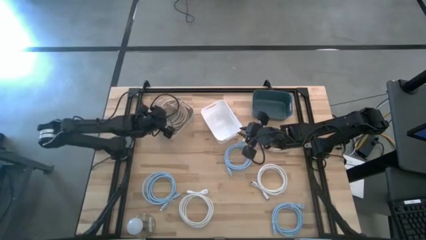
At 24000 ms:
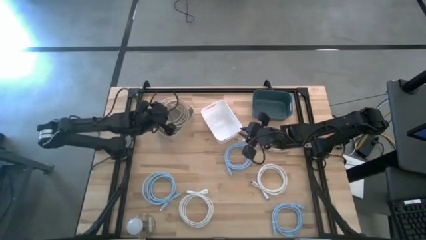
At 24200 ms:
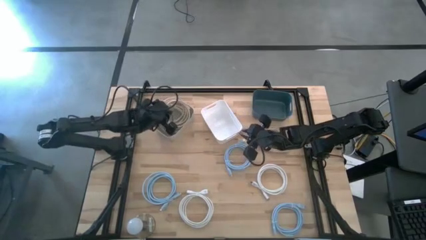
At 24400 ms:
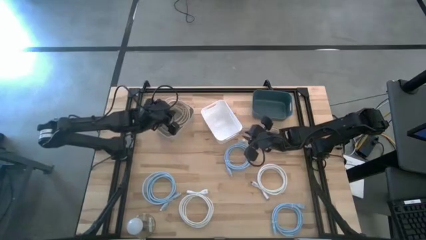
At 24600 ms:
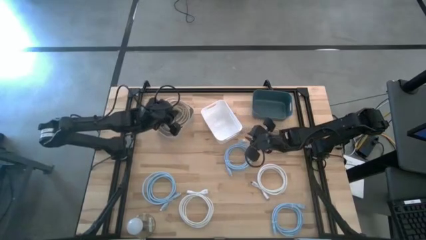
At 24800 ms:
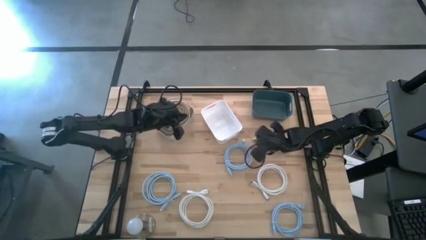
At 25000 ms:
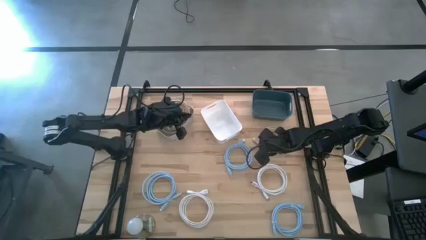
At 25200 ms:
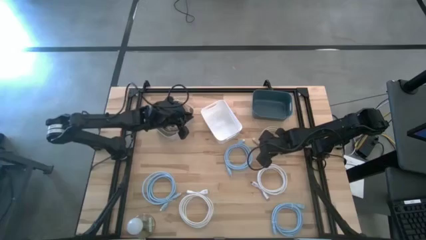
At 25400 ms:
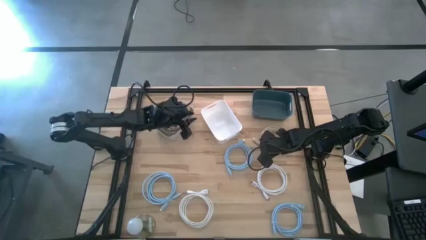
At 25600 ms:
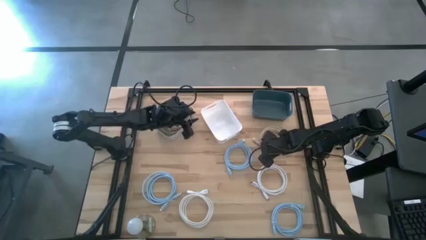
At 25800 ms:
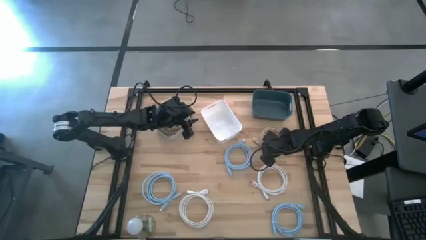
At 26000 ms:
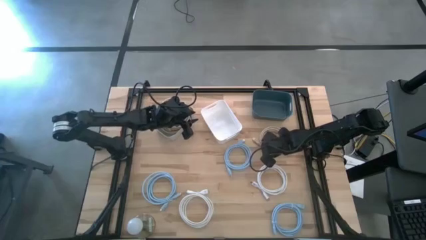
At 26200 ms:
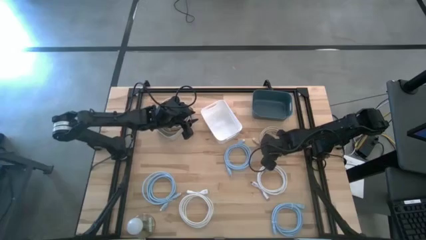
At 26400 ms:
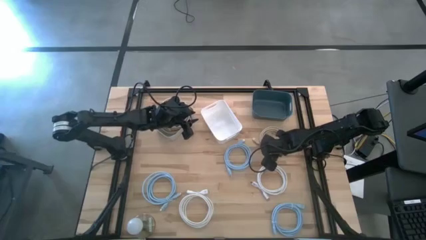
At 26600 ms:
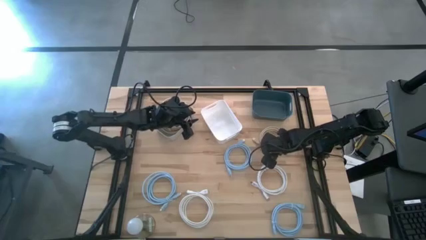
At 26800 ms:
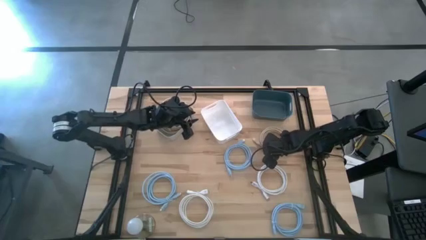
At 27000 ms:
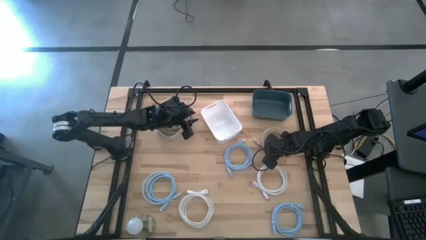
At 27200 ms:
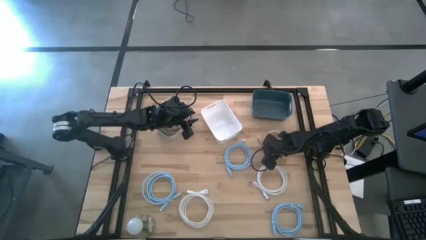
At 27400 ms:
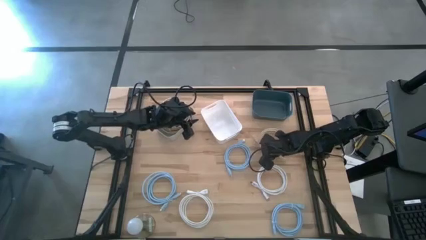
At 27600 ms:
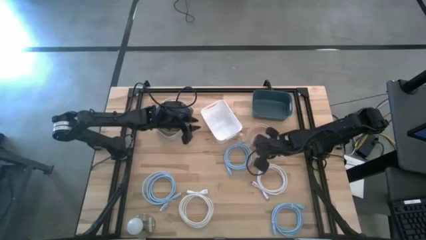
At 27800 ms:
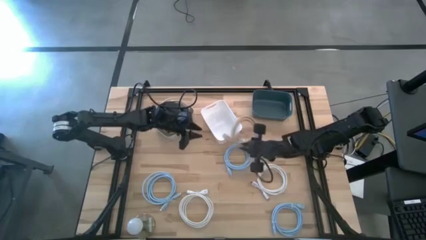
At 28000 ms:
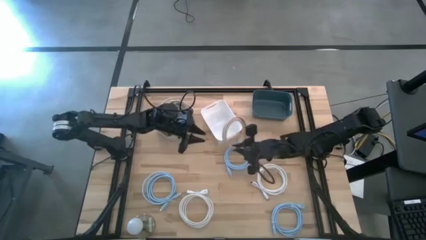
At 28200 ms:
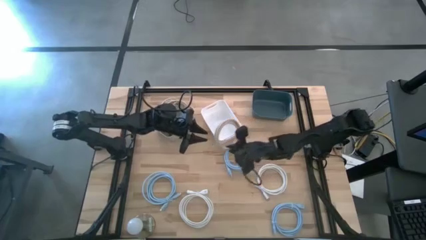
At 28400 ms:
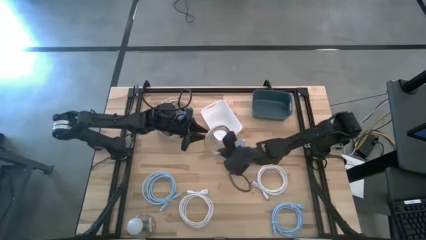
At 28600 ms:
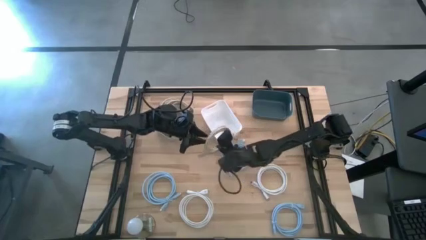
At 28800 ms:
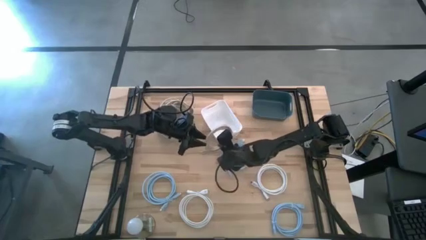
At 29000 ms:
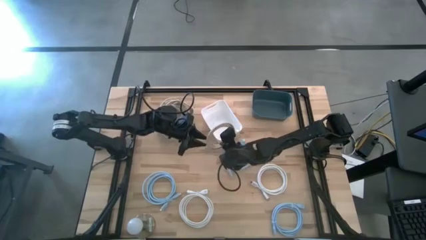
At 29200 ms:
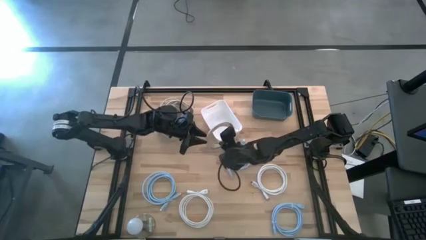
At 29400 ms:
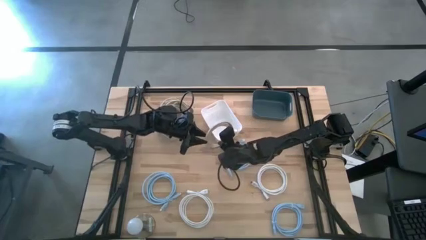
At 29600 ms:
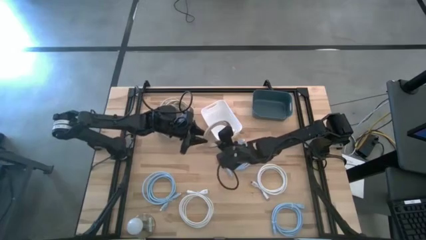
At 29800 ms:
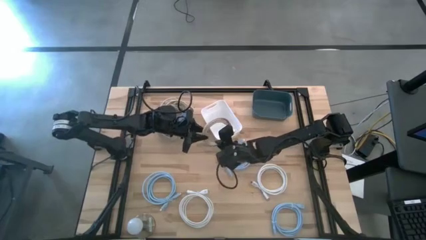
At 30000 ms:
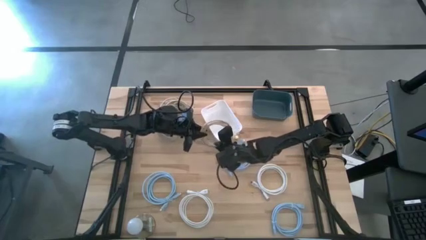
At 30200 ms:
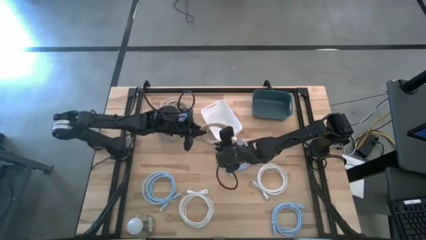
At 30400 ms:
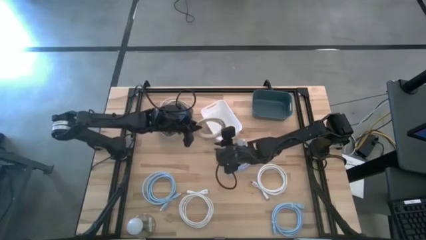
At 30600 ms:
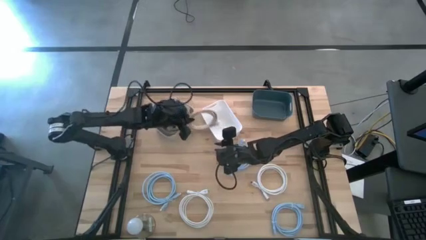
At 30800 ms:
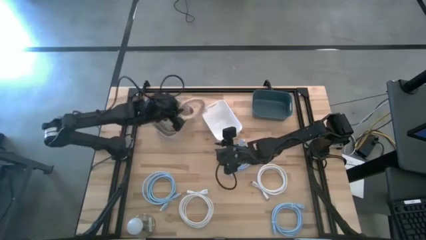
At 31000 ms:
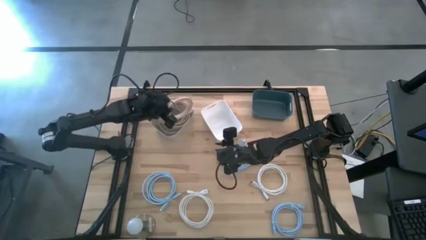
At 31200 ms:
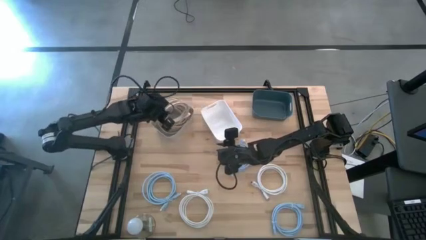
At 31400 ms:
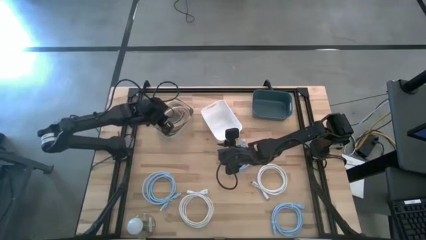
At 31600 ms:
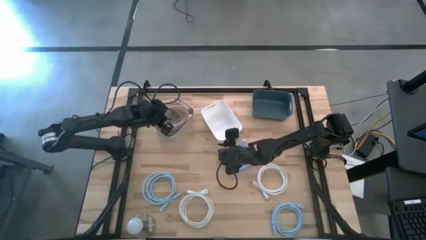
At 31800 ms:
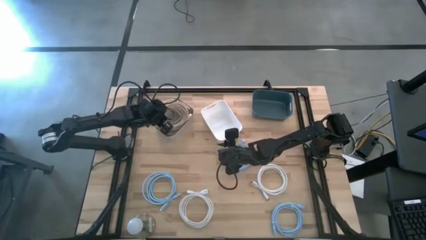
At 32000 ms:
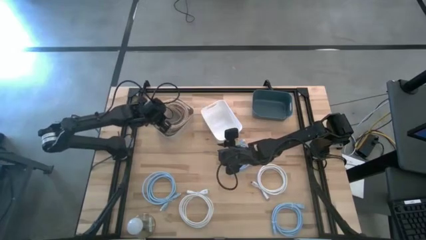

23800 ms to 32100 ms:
Task: Sort HDMI cables
Put the light brown hdmi cable into the gray bin

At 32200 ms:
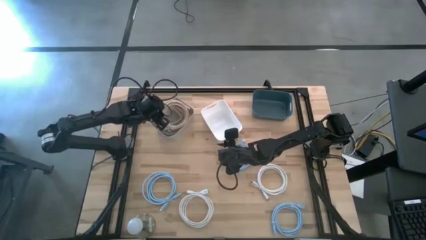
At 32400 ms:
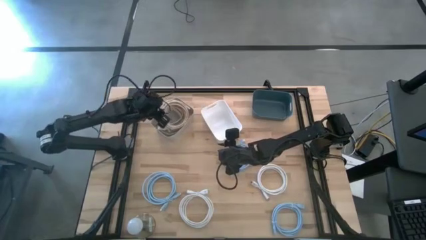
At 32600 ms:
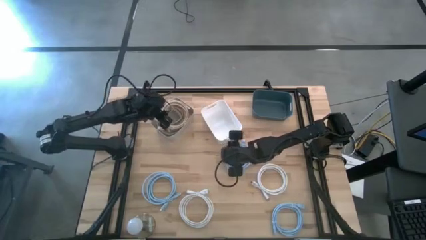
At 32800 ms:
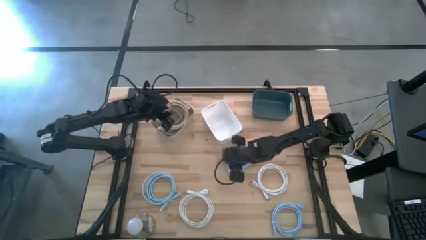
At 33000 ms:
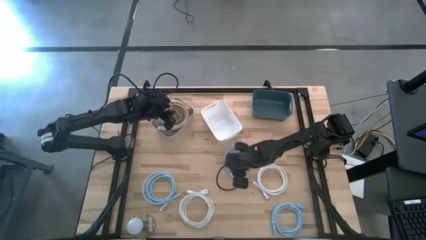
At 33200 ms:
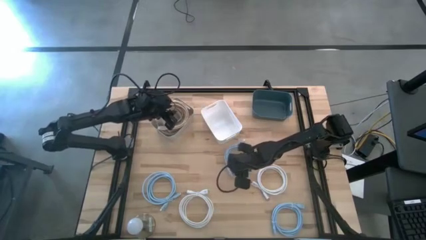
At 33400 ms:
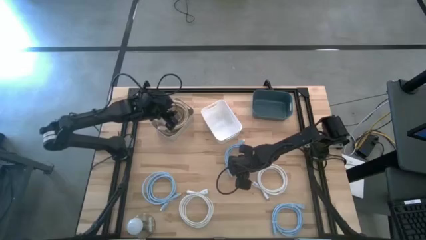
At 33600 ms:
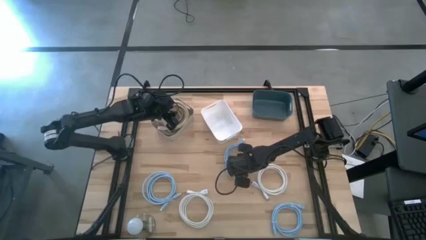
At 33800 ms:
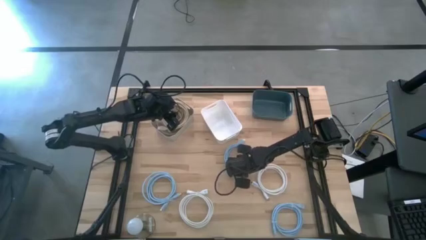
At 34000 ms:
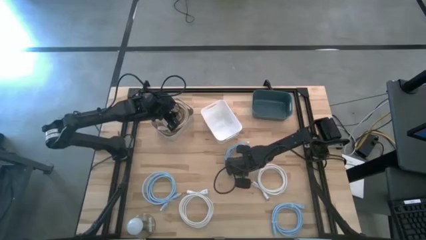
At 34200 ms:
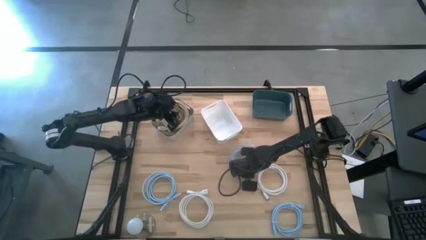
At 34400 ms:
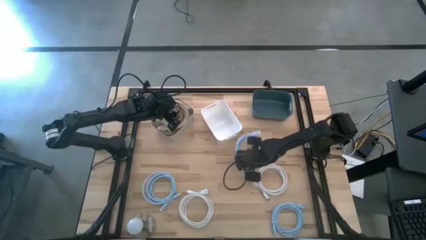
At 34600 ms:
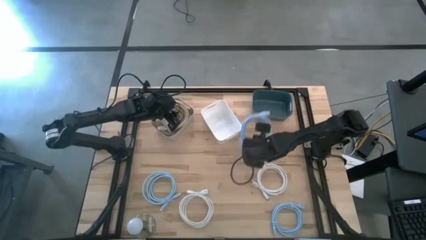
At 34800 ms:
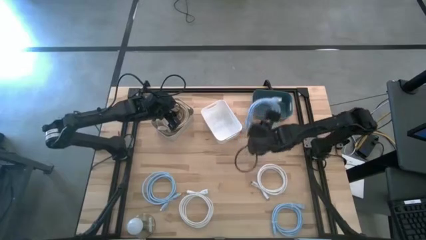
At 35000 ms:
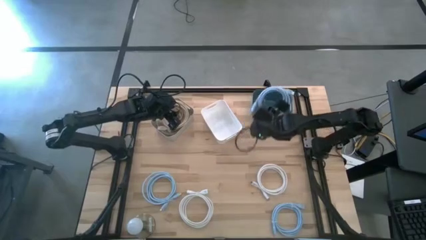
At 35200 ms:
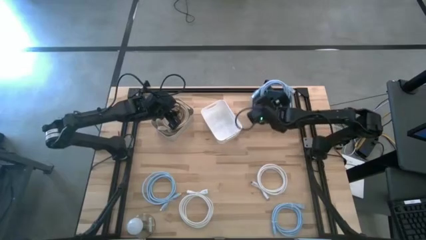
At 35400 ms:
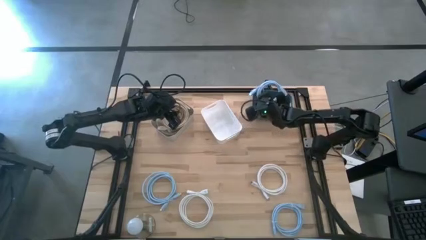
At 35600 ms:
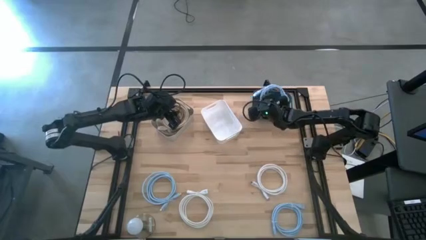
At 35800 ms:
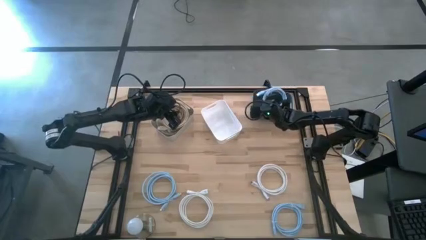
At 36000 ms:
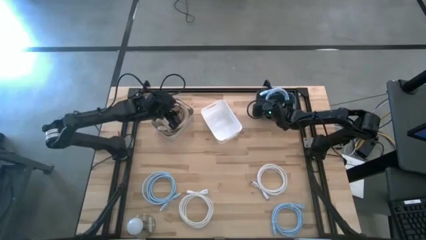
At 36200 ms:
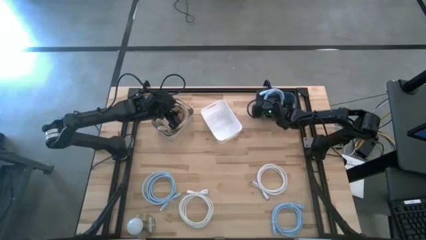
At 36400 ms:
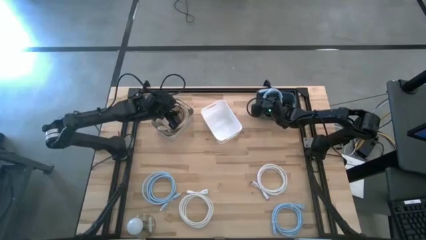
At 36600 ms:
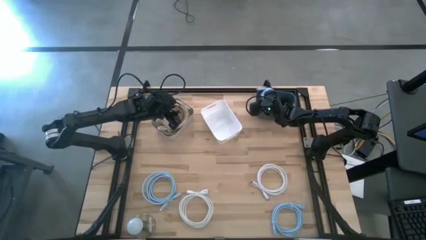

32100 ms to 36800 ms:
Put the top light blue hdmi cable into the blue bin

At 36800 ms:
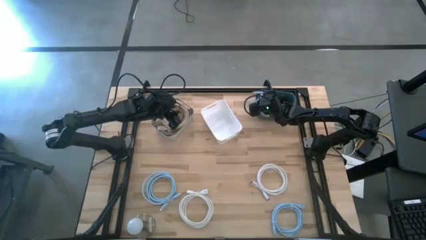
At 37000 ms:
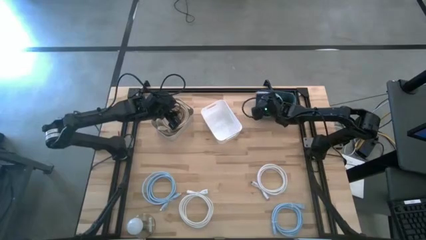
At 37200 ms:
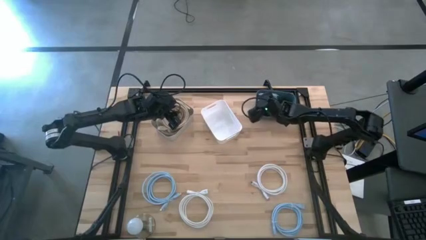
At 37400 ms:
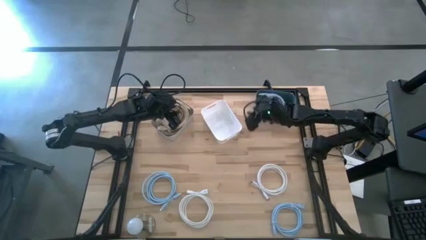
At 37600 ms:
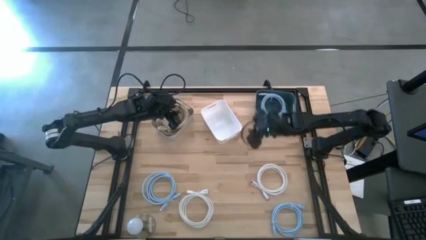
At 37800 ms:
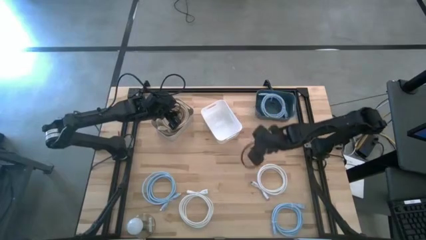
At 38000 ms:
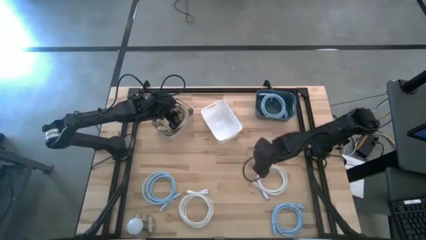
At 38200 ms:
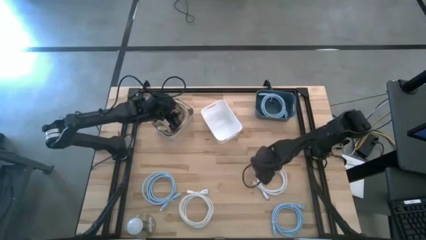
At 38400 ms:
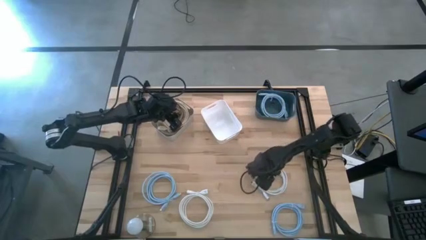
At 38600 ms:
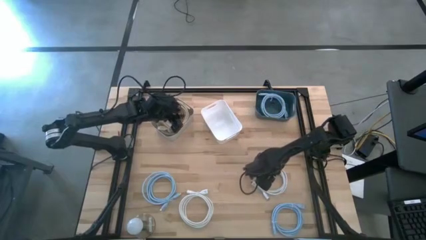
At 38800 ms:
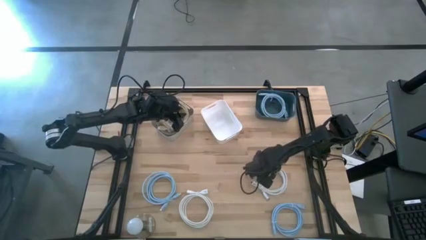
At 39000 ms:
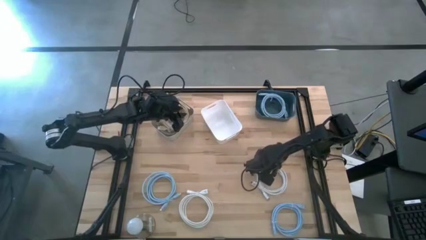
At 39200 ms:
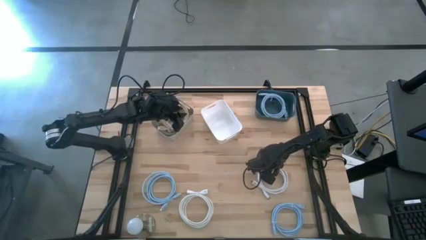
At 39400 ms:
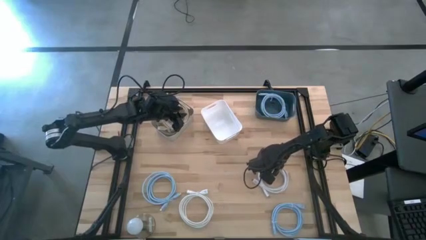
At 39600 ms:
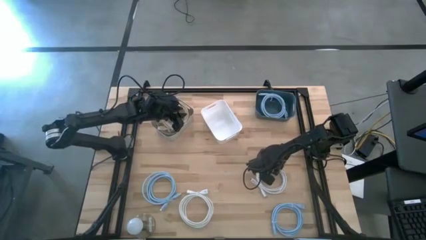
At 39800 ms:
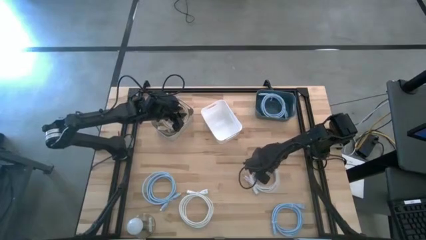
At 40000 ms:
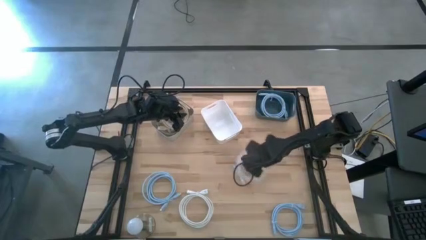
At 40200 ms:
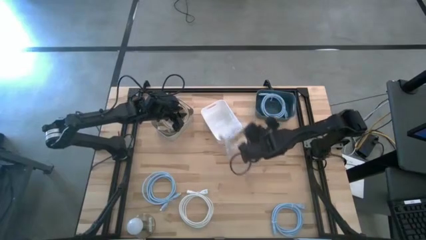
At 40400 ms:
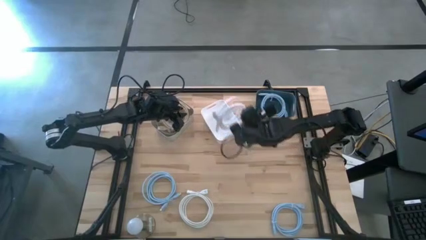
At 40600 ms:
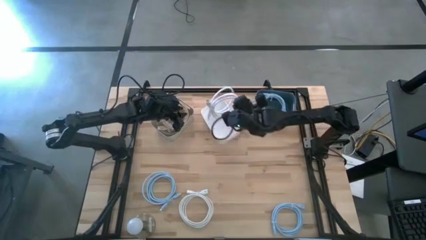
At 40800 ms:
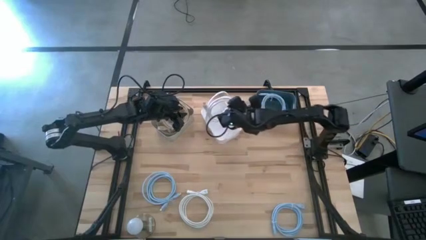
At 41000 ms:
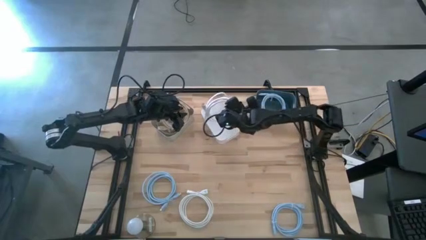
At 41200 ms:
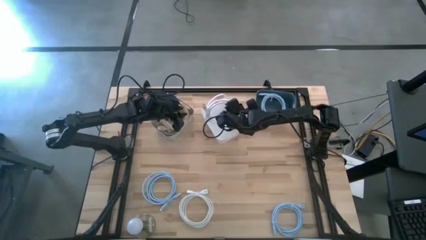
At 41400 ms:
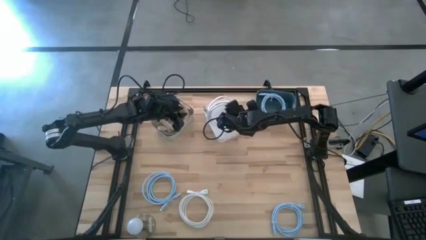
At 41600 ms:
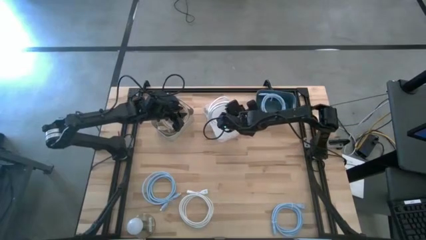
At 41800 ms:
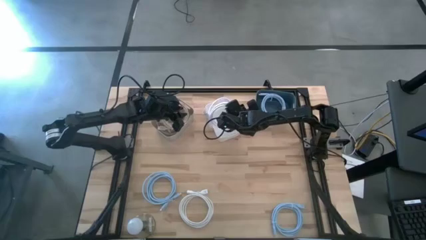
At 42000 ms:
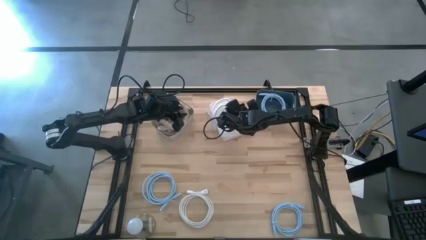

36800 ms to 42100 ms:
Put the top white hdmi cable into the white bin
